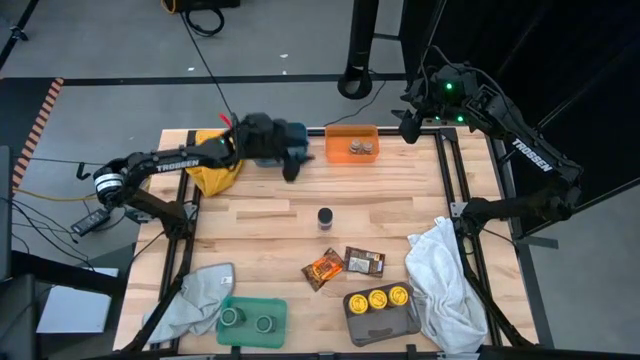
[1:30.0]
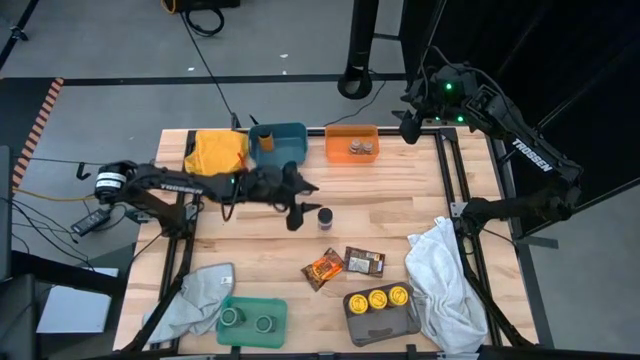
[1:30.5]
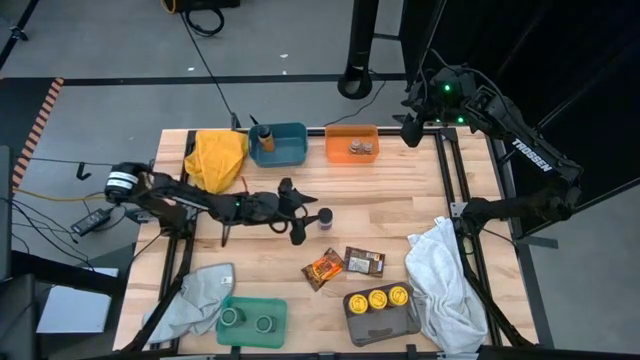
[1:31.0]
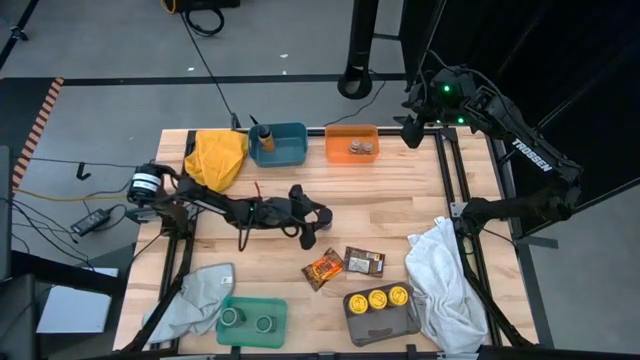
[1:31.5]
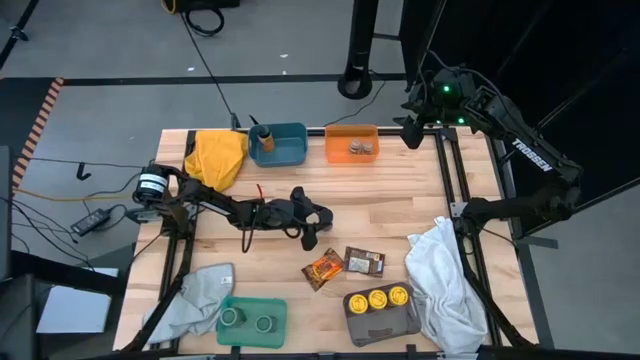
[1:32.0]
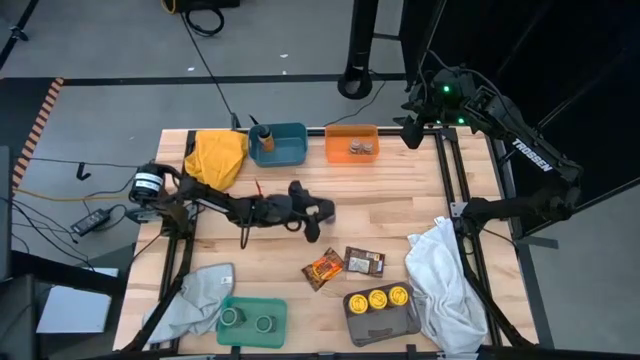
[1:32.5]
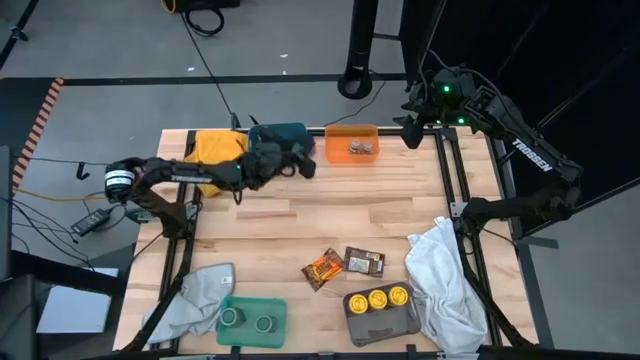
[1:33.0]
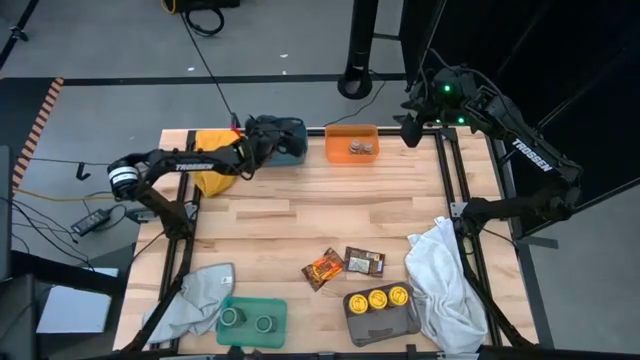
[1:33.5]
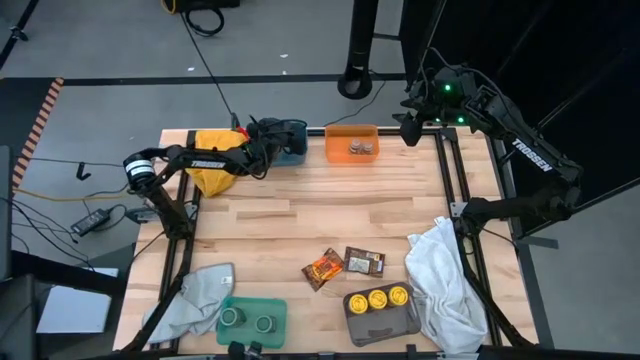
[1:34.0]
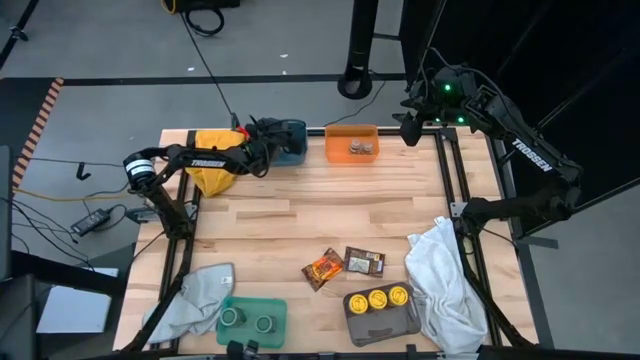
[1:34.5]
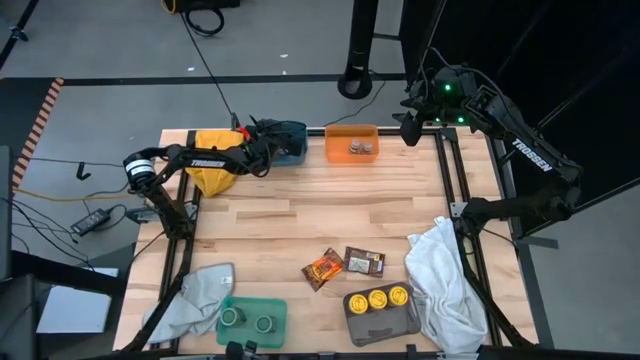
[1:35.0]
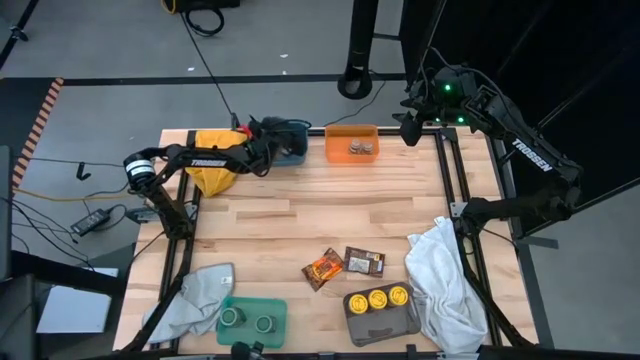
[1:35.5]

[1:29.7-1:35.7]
Task: Sort spices by type
Put the black seasoning bottle into the blue bin

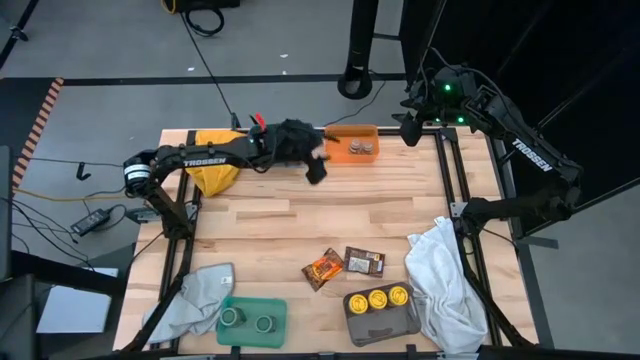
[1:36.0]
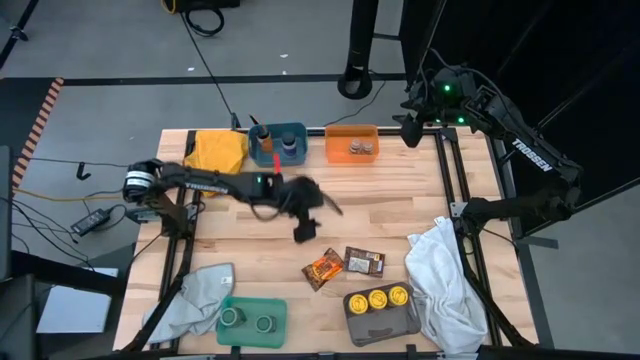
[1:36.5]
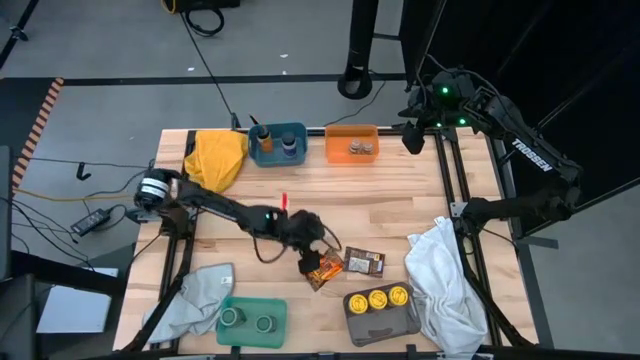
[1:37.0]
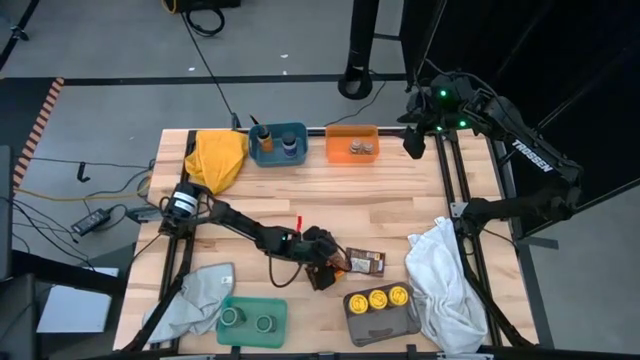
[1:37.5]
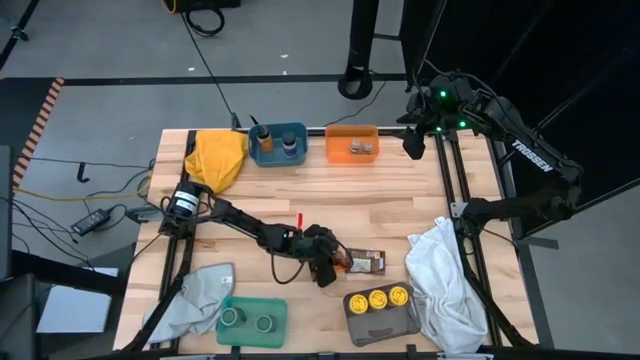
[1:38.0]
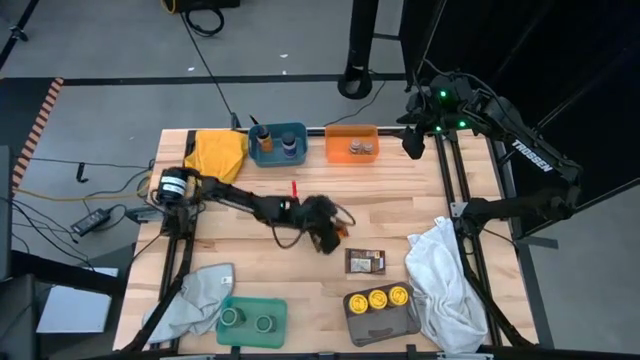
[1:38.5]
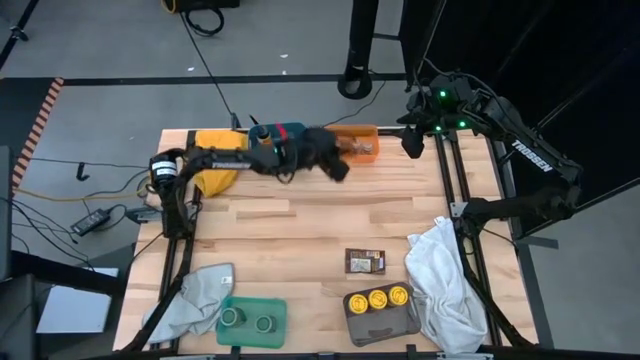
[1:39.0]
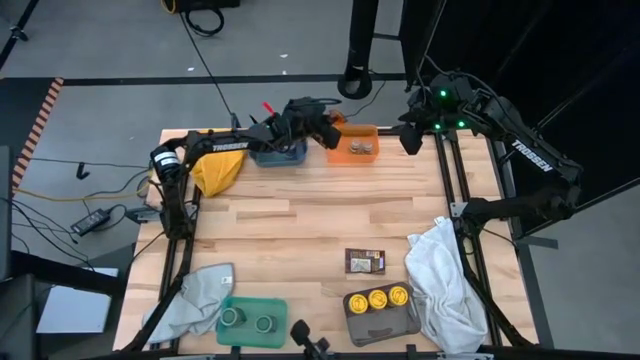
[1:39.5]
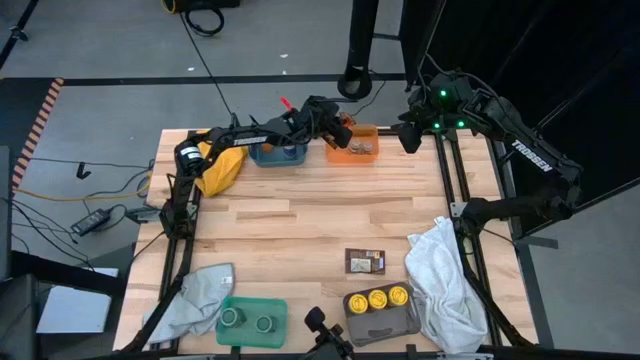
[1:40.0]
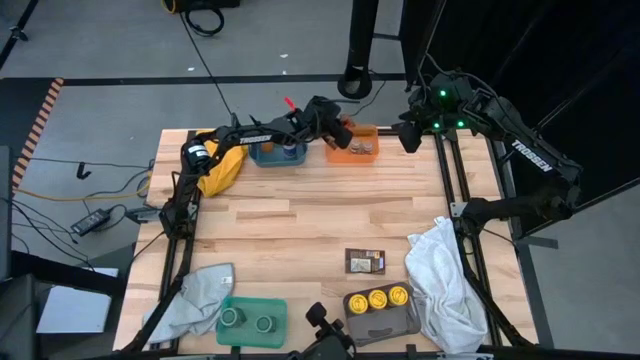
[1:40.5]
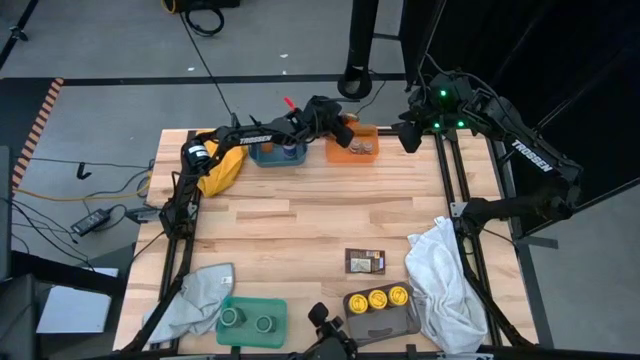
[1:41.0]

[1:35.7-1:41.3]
Put the left orange seasoning pack into the orange bin

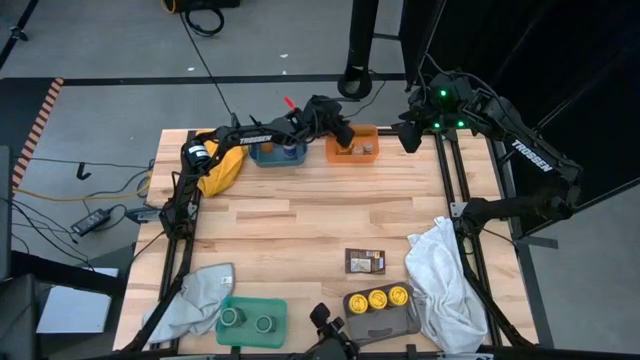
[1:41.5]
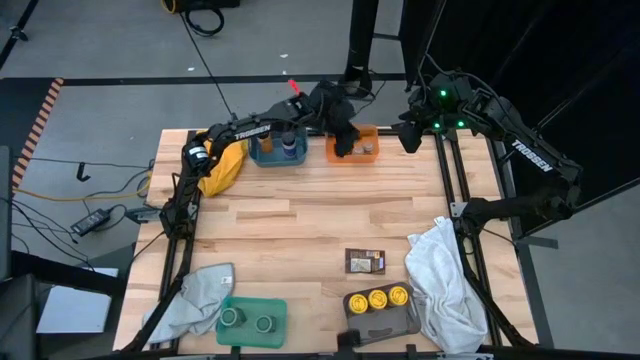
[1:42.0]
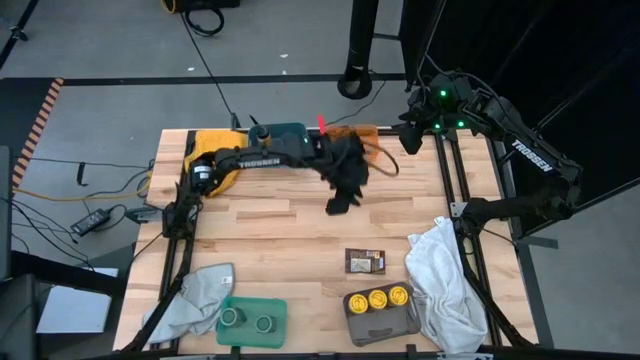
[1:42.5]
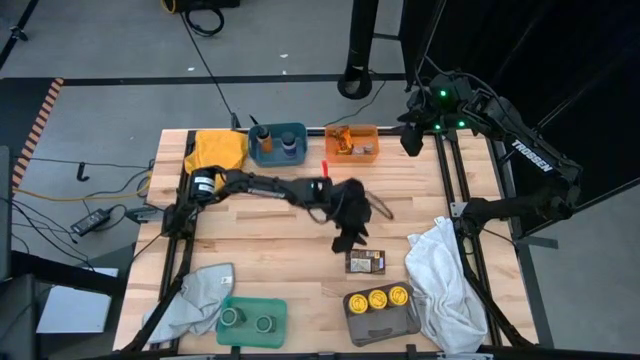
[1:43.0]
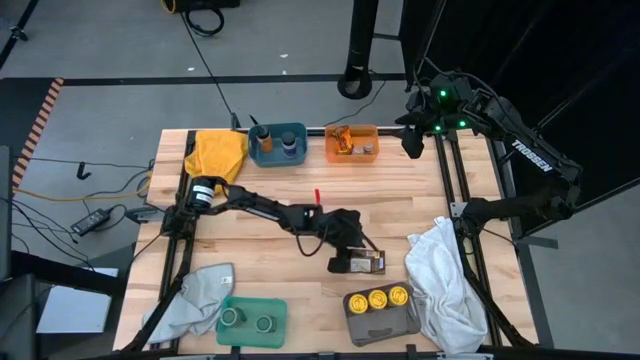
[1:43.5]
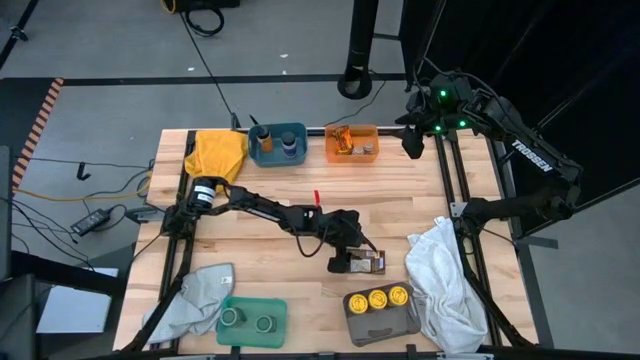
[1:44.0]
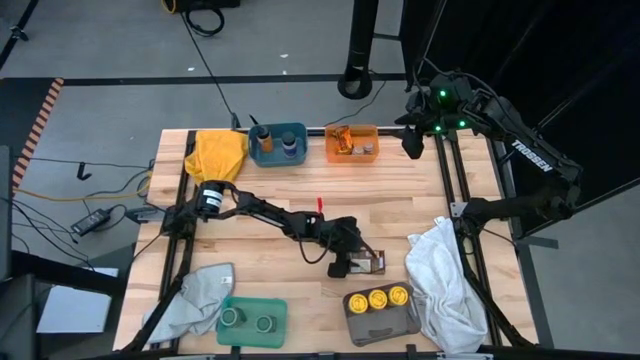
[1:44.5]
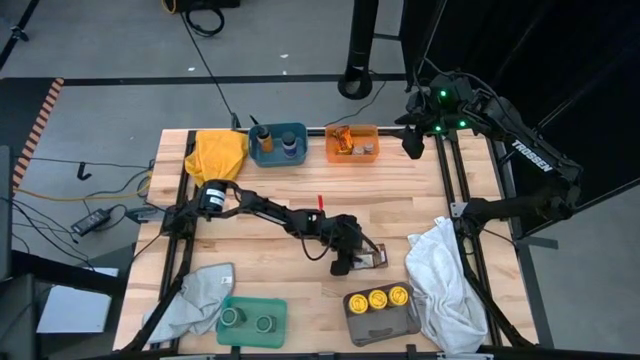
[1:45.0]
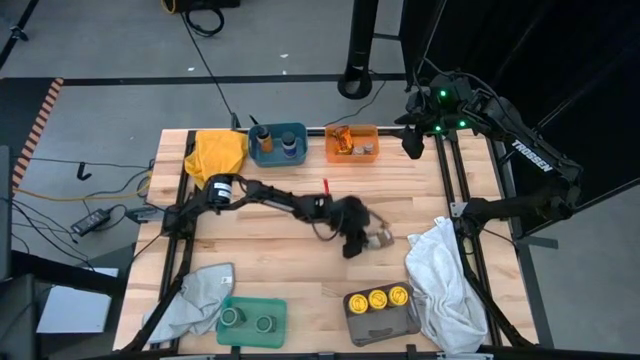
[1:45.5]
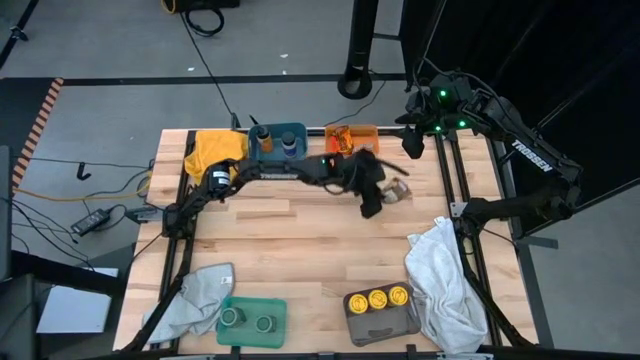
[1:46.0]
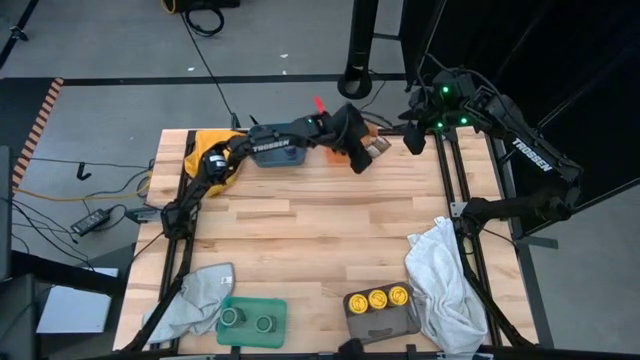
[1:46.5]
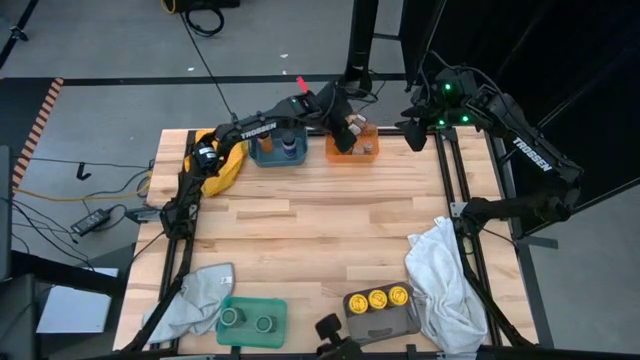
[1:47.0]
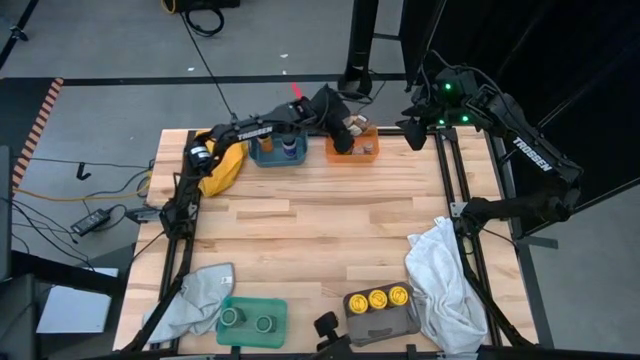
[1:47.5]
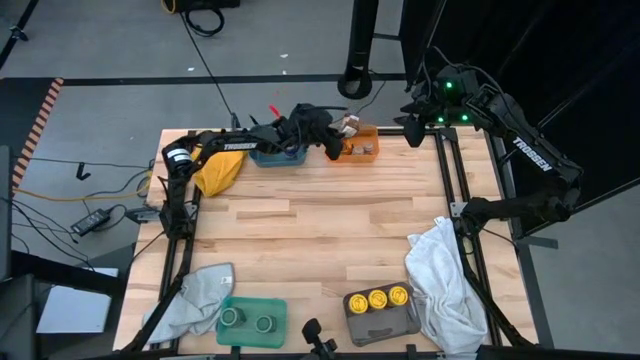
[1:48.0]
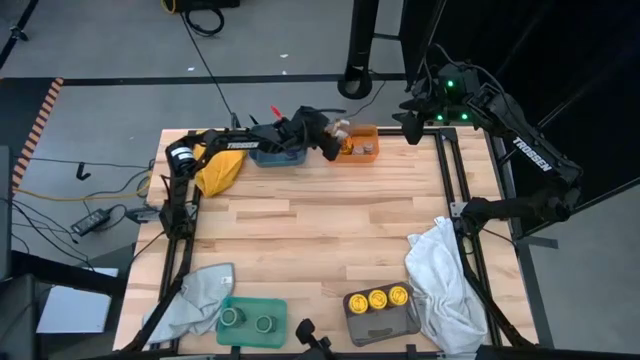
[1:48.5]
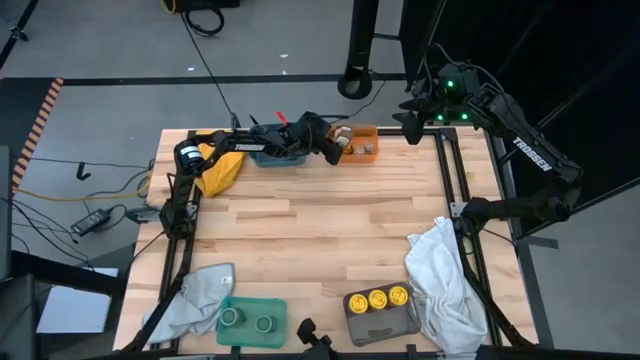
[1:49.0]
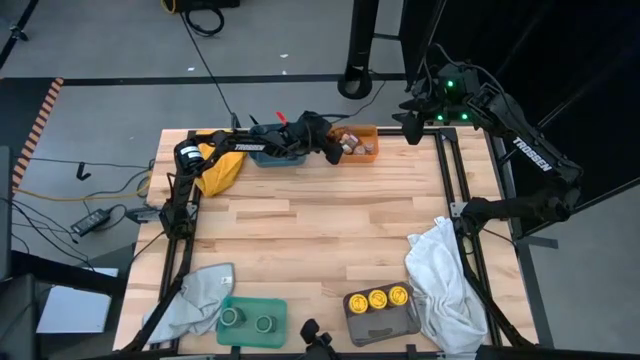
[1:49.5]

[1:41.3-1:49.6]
Put the orange seasoning pack into the orange bin

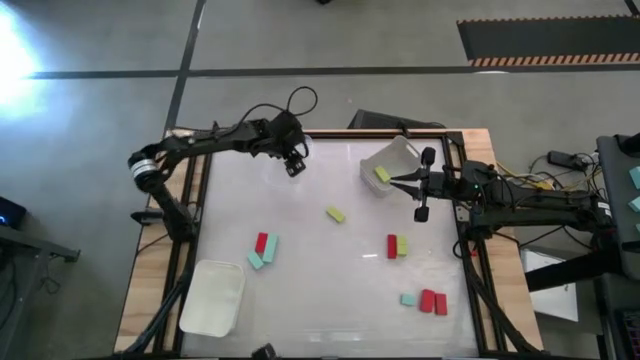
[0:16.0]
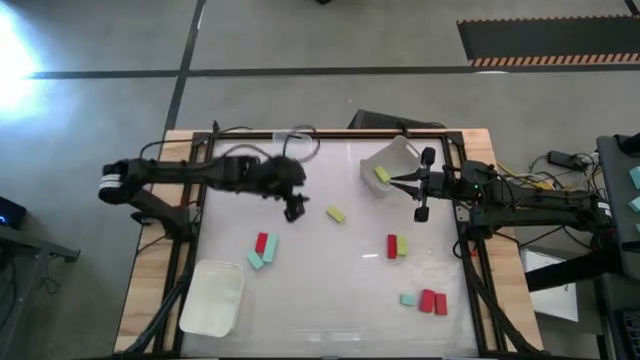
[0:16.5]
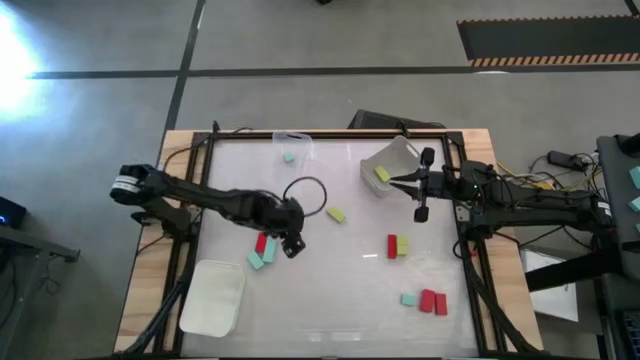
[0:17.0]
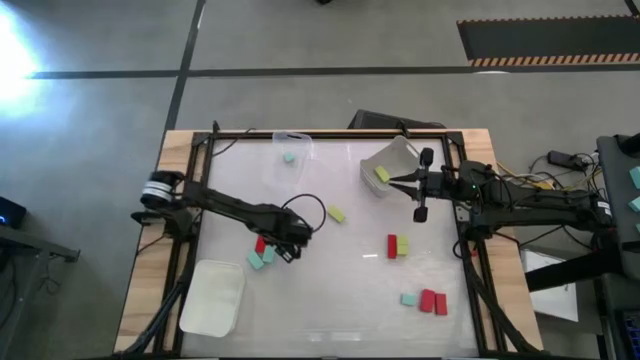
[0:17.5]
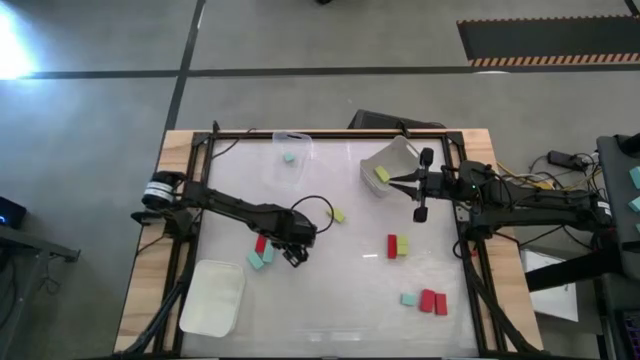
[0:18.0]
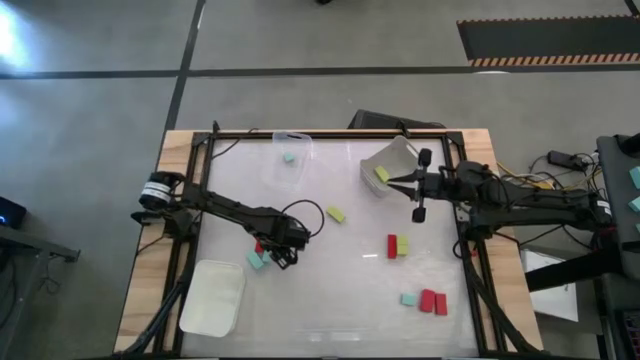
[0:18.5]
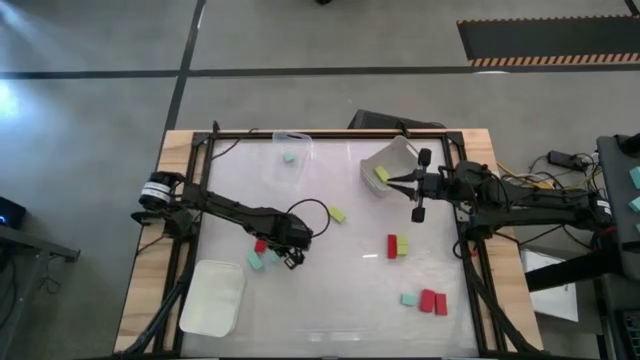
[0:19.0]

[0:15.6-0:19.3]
Task: Sort & place blocks by color
Put the light blue block into the transparent bin
